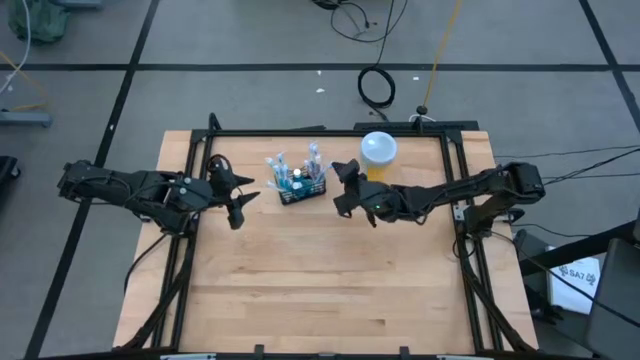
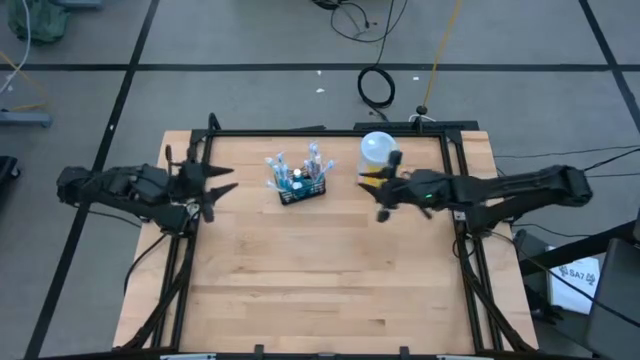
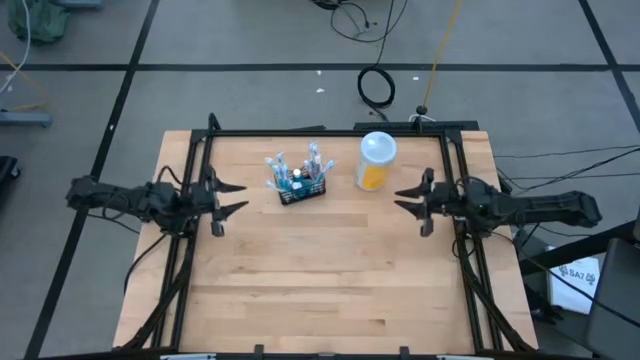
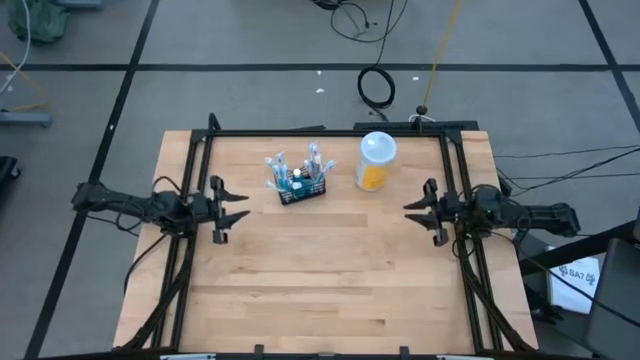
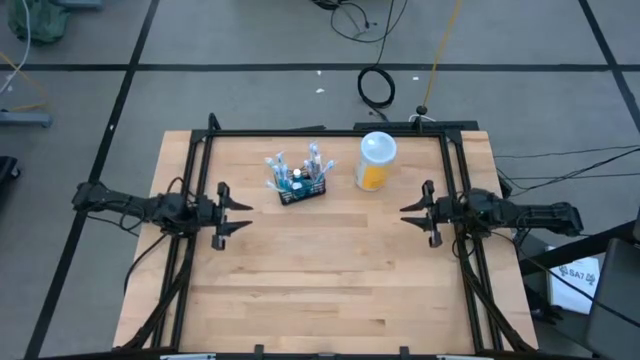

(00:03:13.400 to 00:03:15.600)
Task: Pick & Place toothbrushing station
Return to Home Position

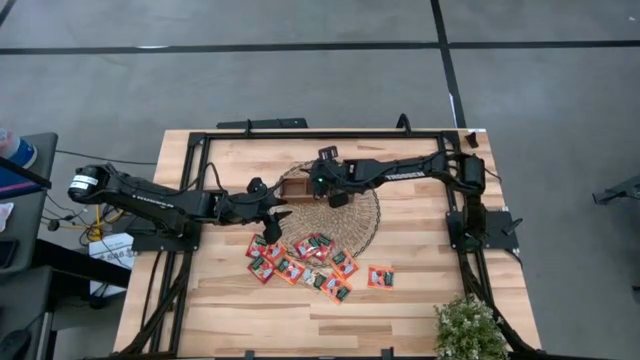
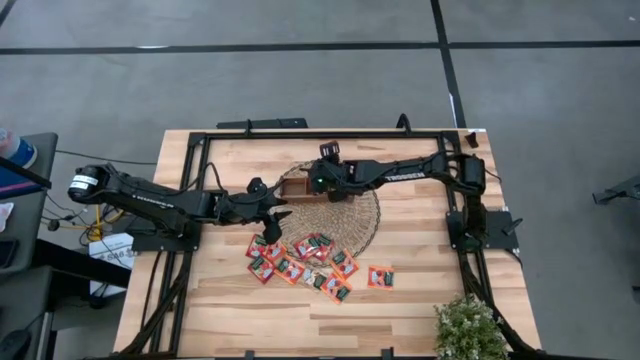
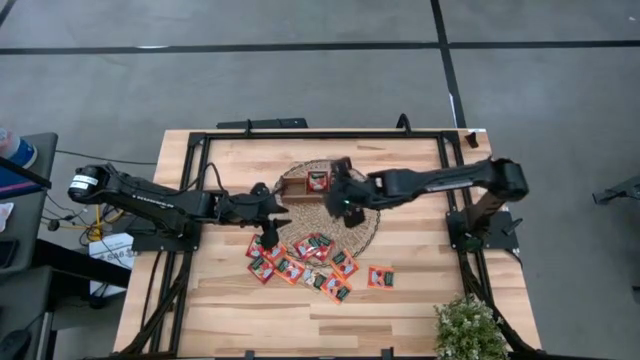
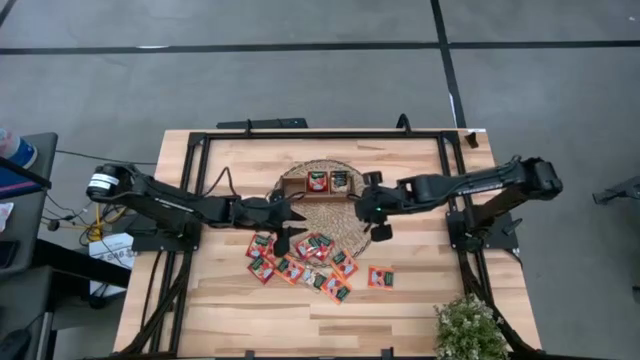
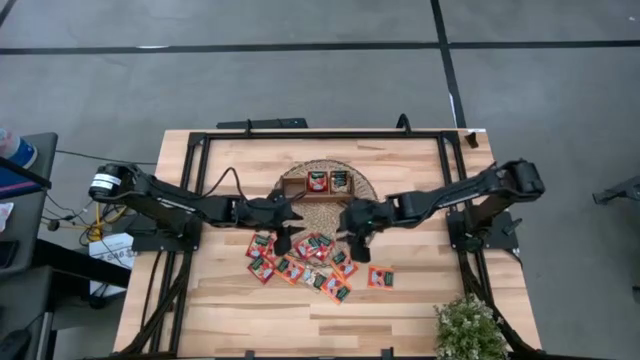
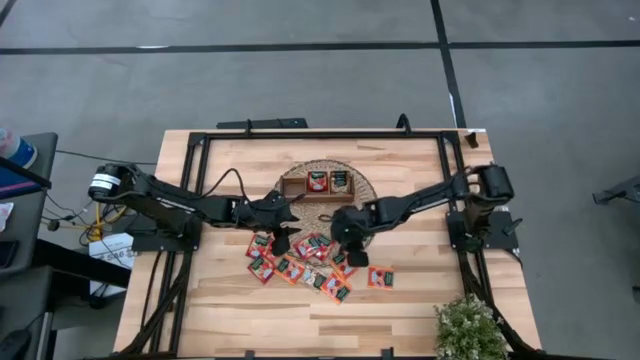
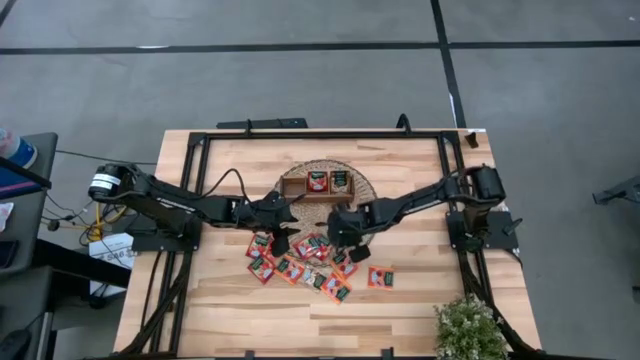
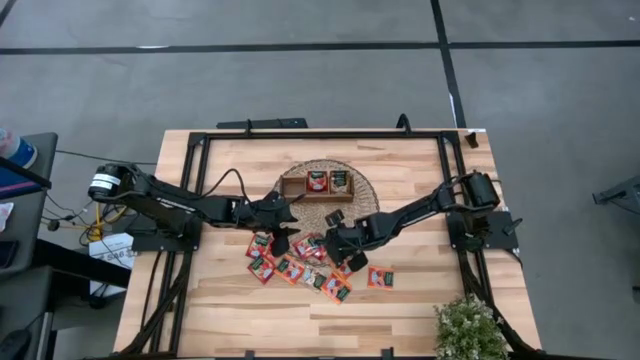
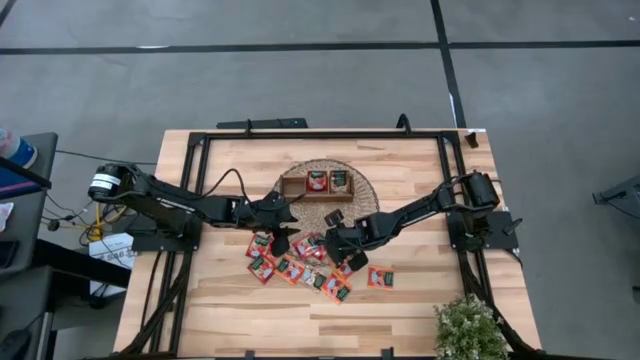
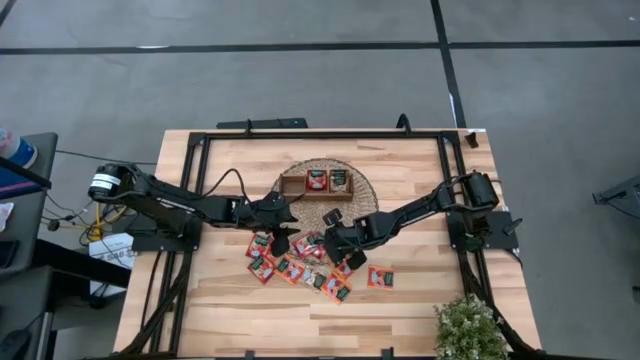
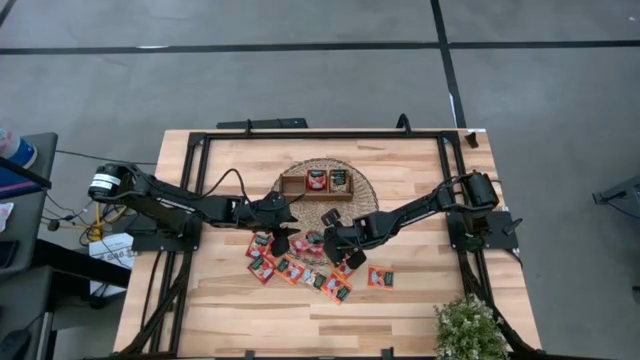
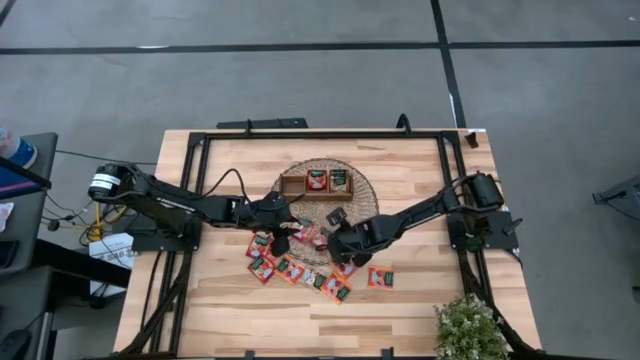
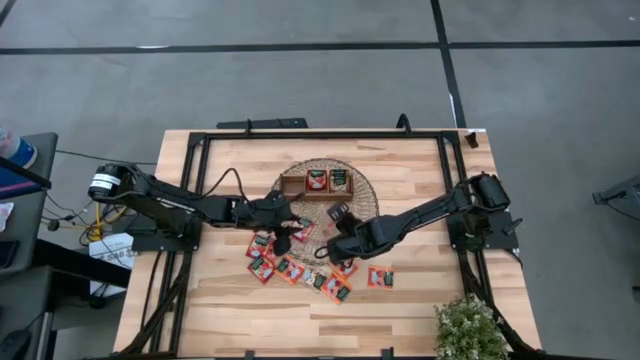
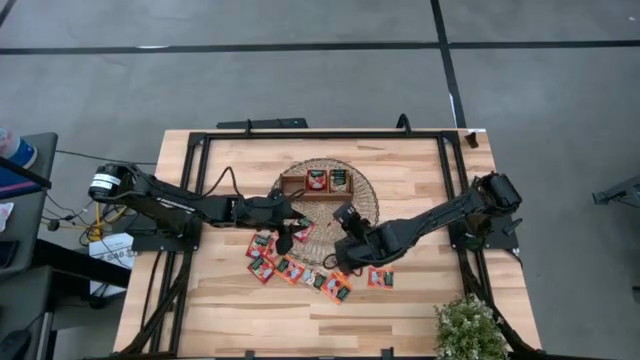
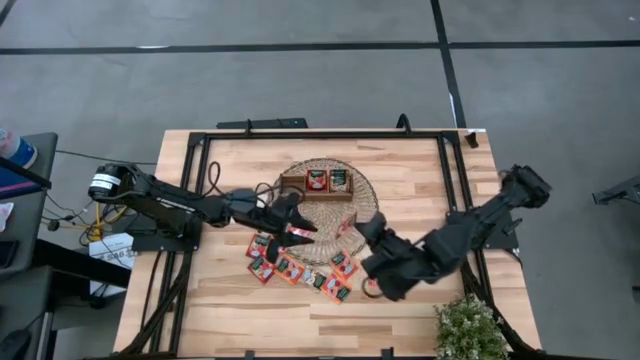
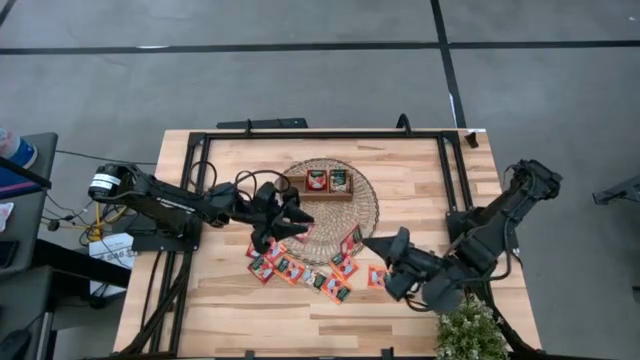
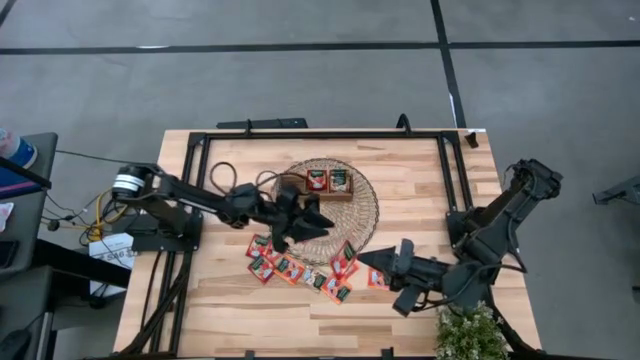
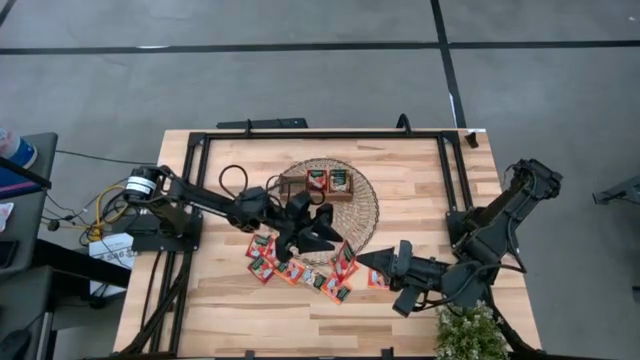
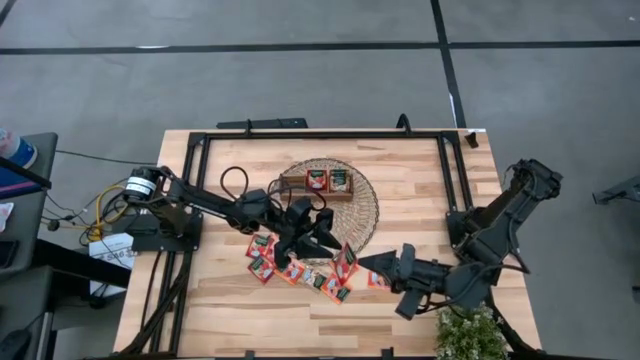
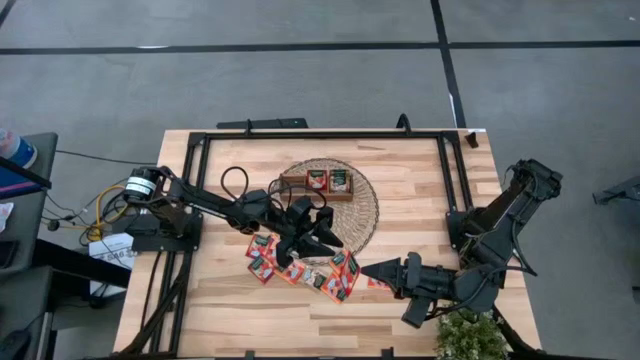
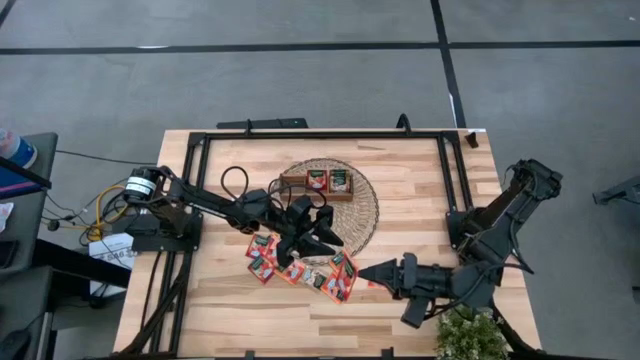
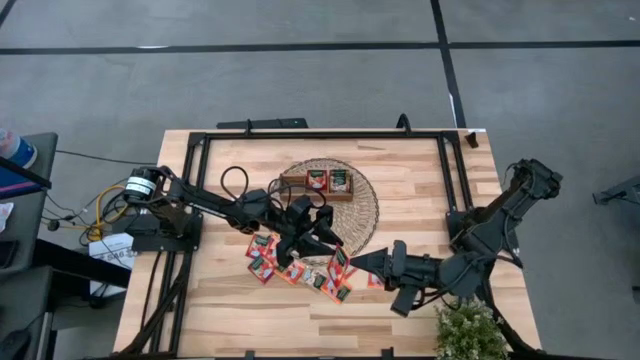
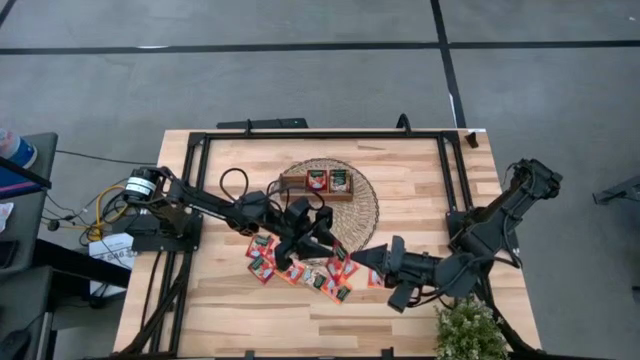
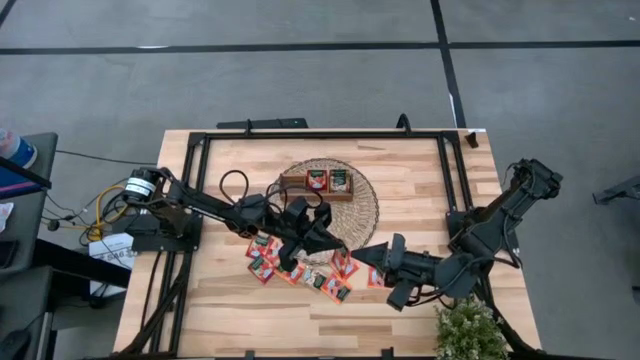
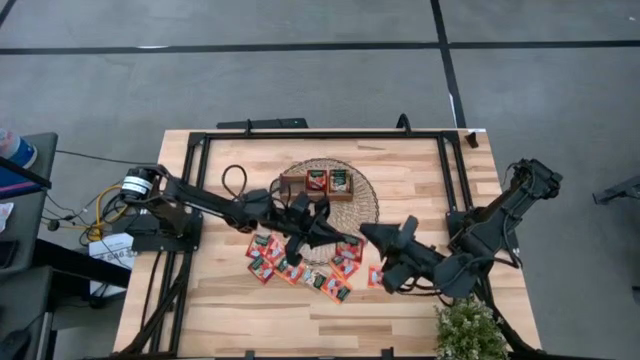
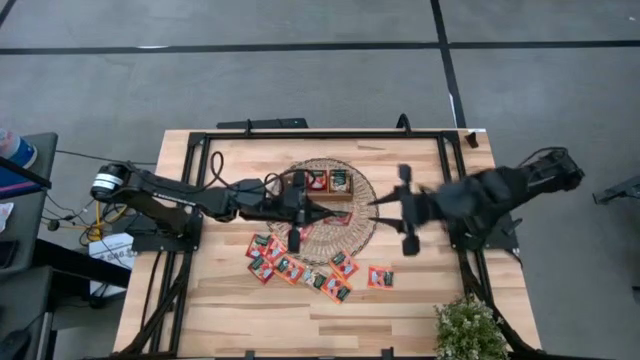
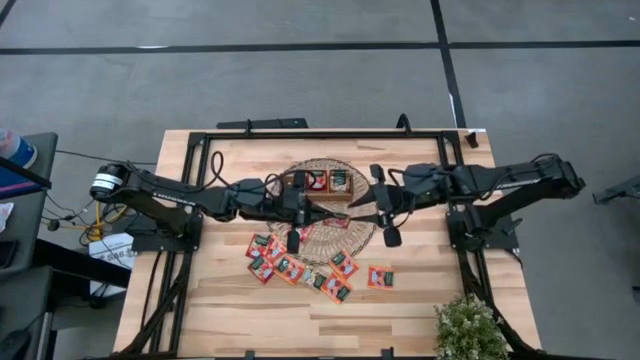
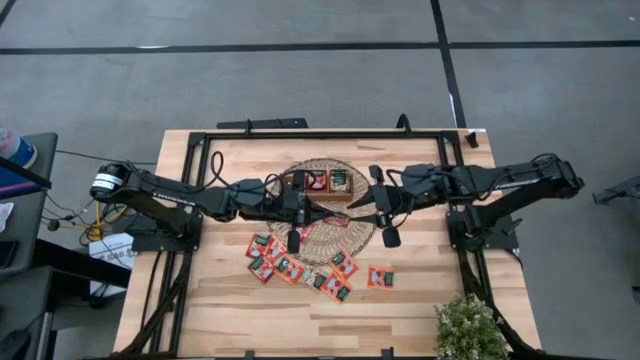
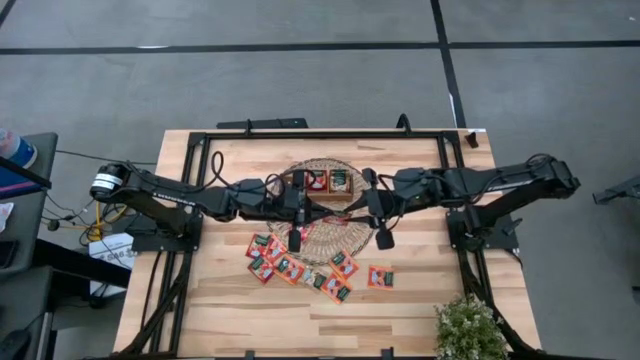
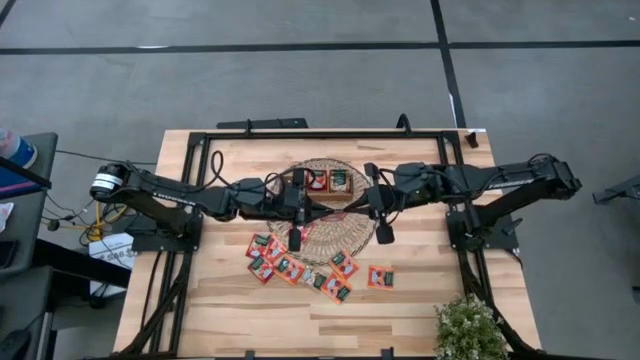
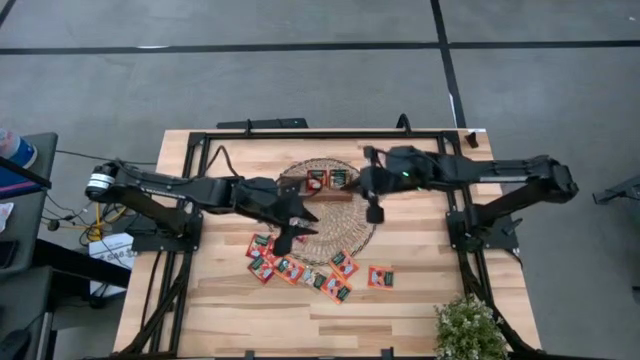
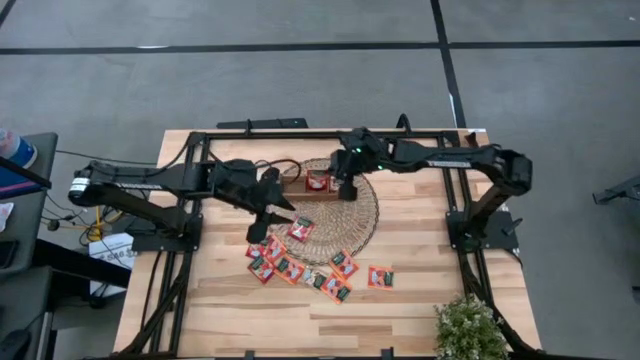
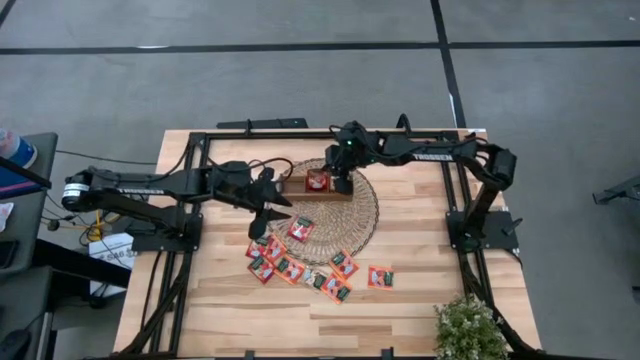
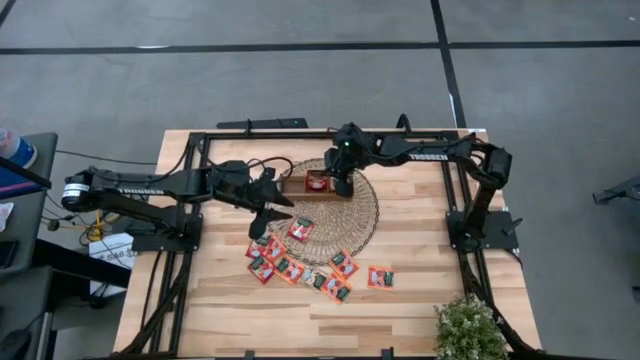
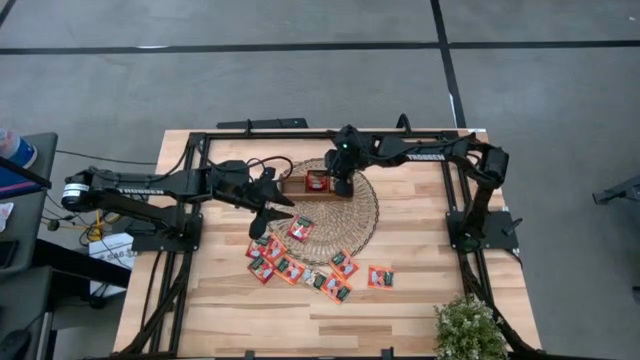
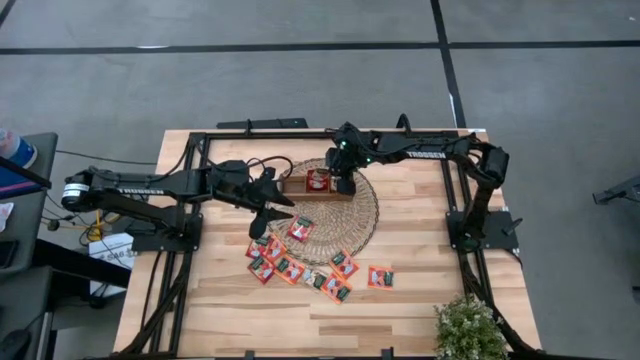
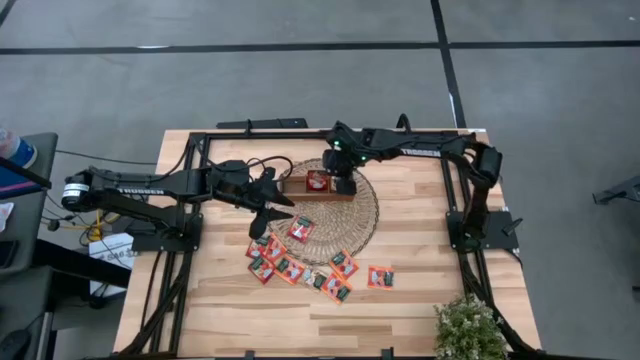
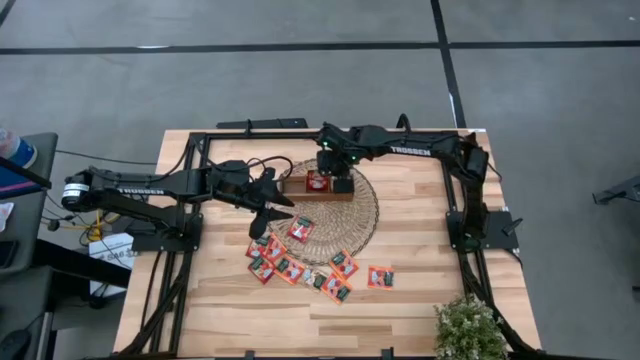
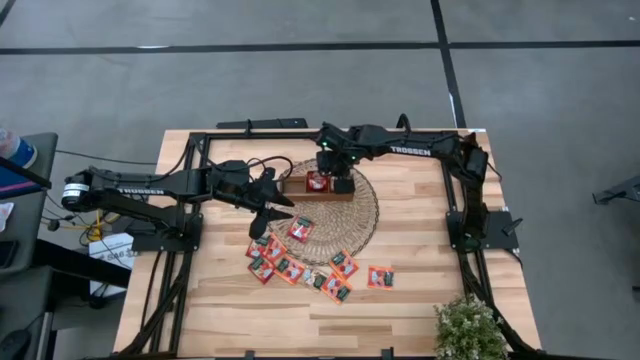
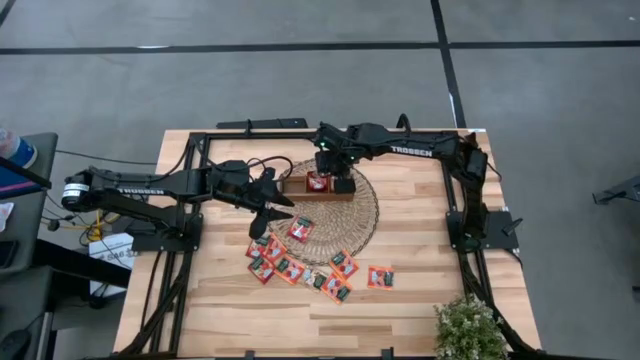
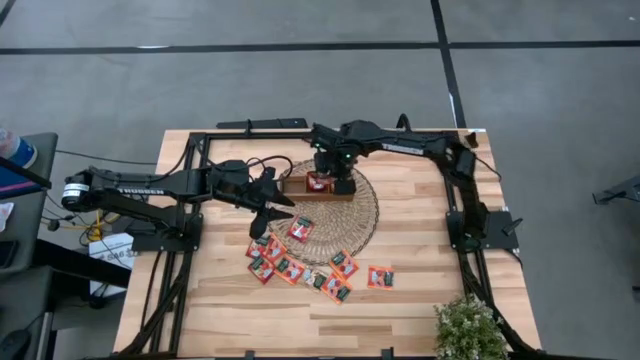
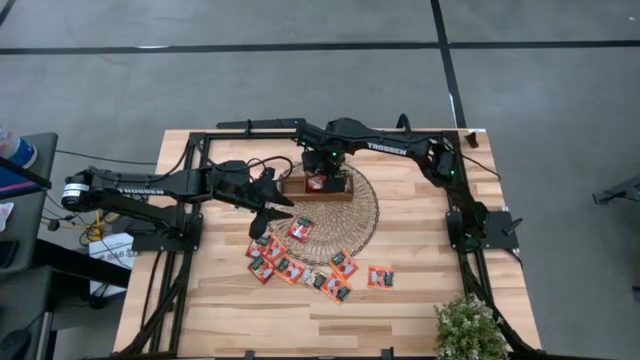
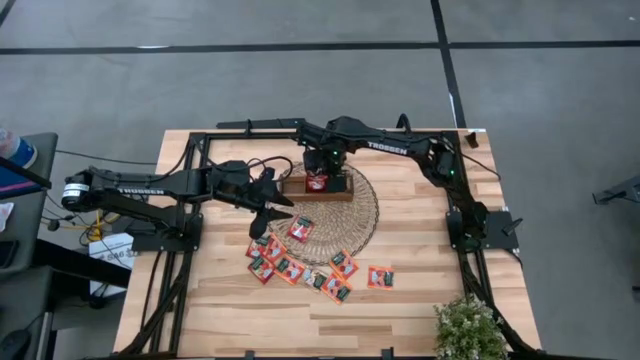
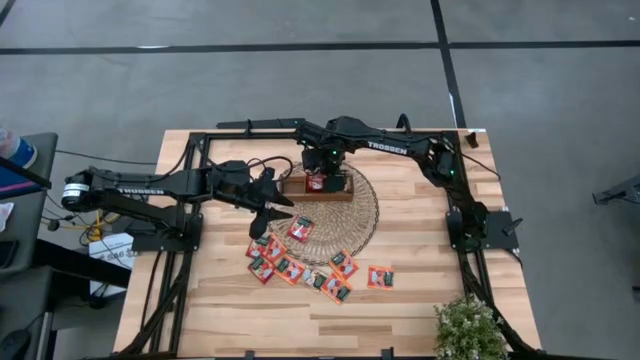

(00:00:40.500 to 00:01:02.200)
Task: Pick & Place Tea
Put the red tea bag into the middle section of the wooden organizer
